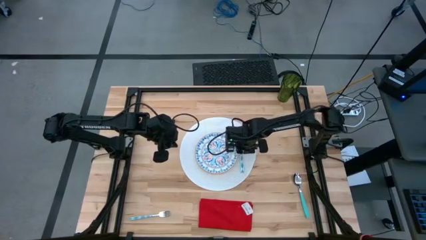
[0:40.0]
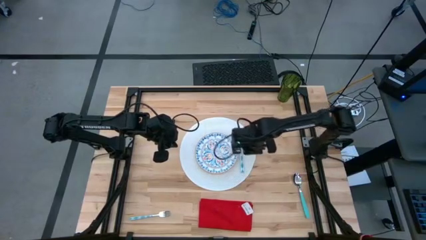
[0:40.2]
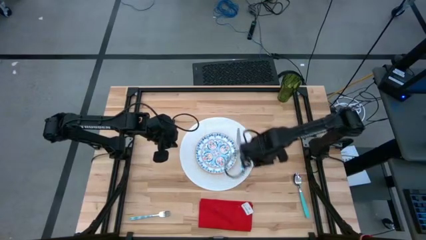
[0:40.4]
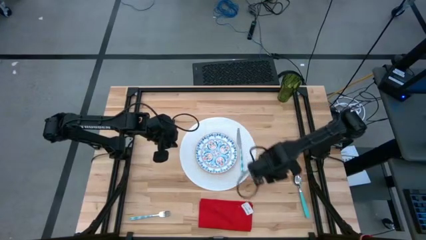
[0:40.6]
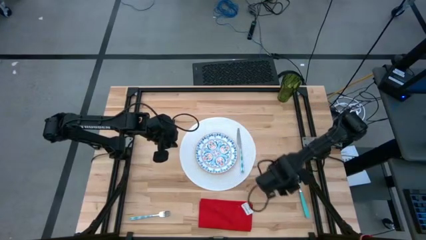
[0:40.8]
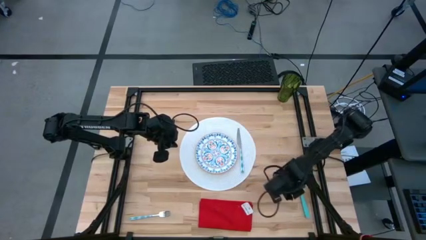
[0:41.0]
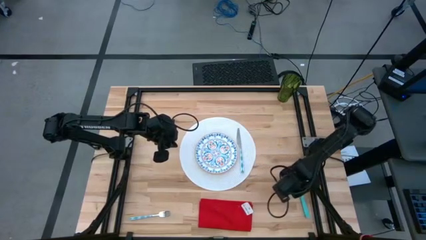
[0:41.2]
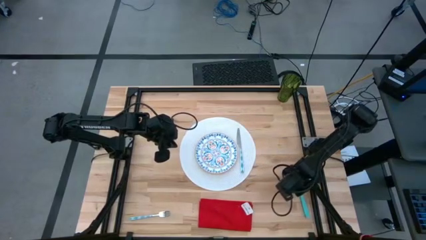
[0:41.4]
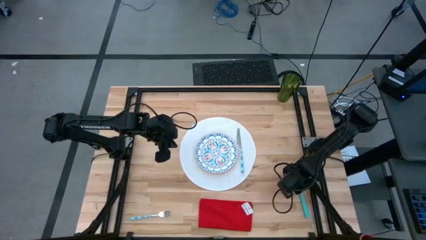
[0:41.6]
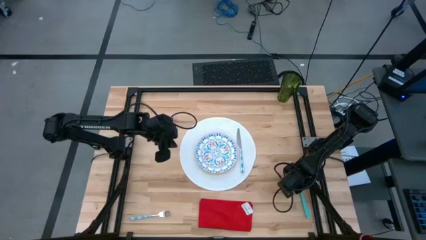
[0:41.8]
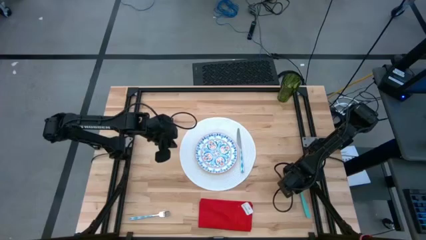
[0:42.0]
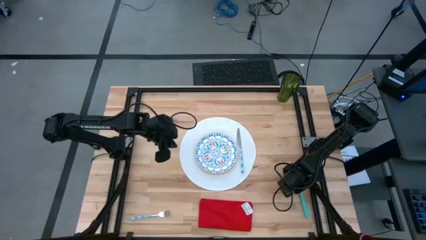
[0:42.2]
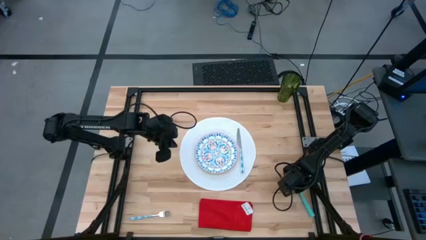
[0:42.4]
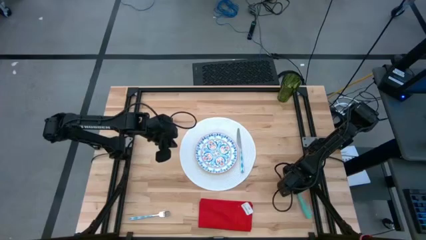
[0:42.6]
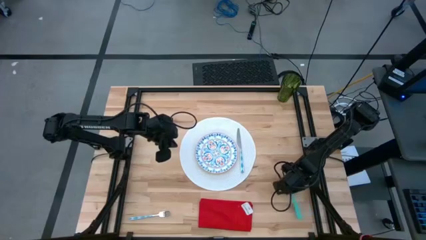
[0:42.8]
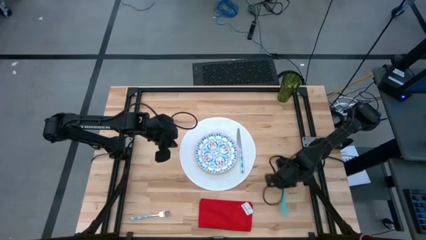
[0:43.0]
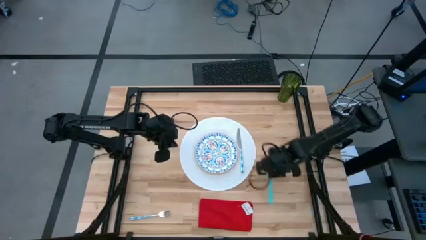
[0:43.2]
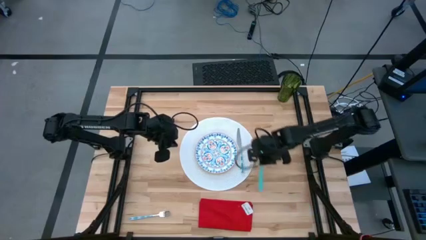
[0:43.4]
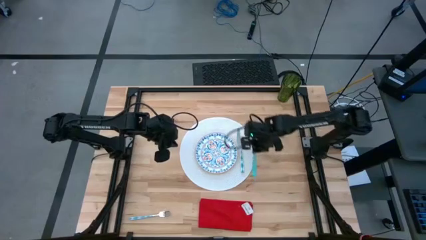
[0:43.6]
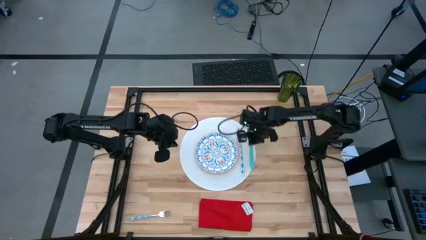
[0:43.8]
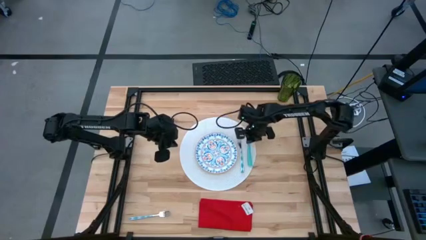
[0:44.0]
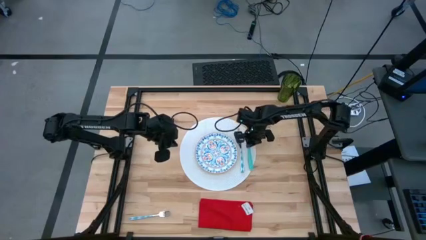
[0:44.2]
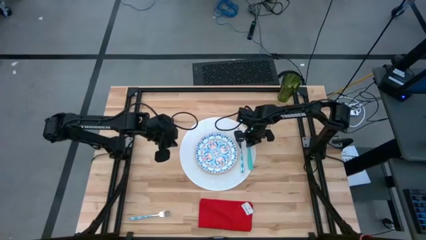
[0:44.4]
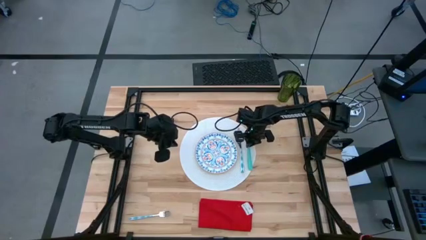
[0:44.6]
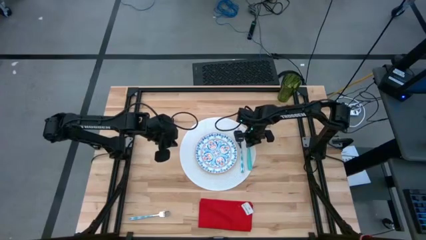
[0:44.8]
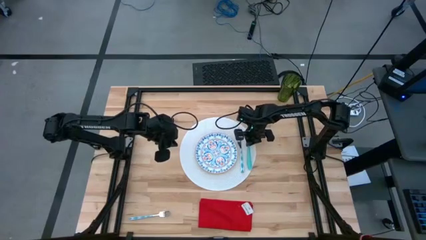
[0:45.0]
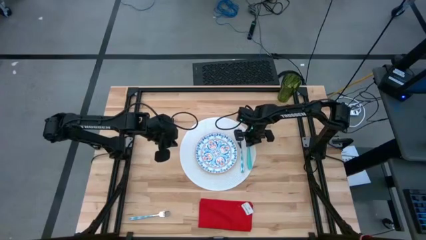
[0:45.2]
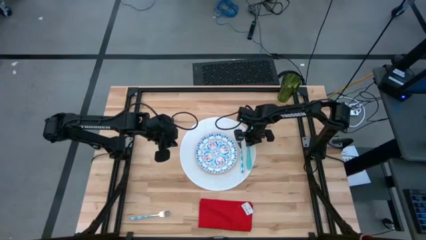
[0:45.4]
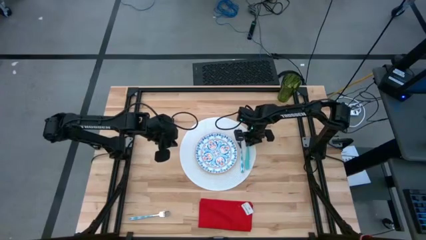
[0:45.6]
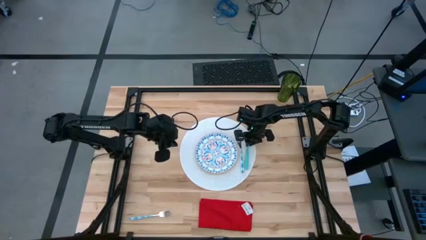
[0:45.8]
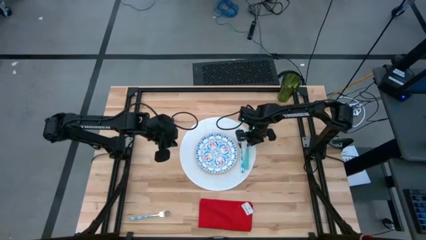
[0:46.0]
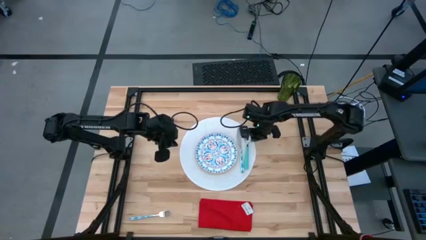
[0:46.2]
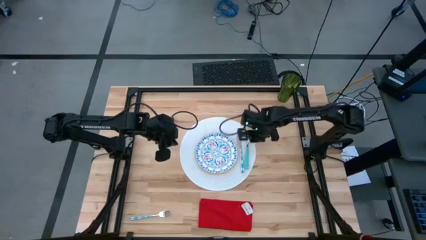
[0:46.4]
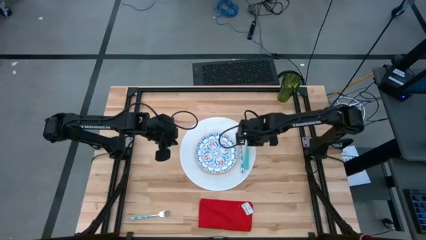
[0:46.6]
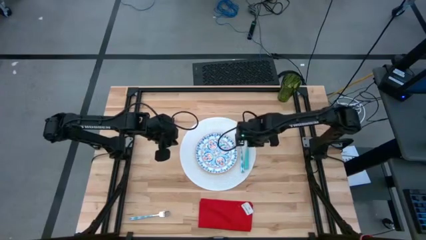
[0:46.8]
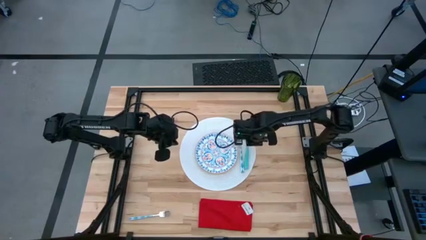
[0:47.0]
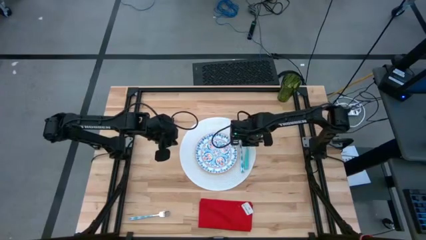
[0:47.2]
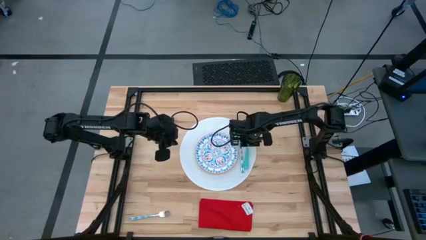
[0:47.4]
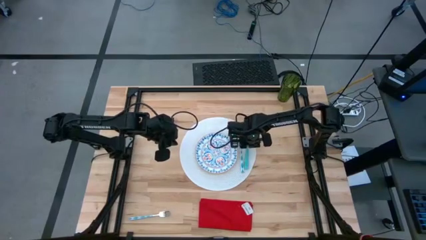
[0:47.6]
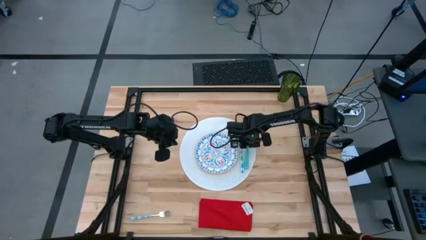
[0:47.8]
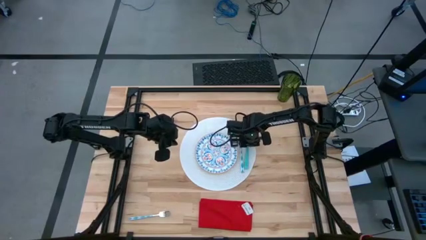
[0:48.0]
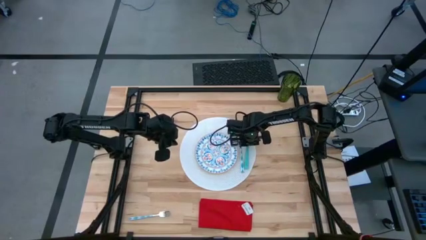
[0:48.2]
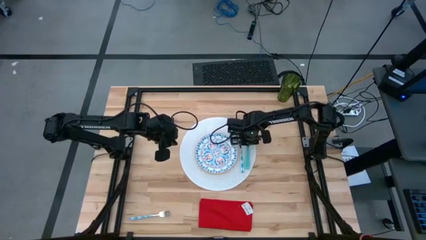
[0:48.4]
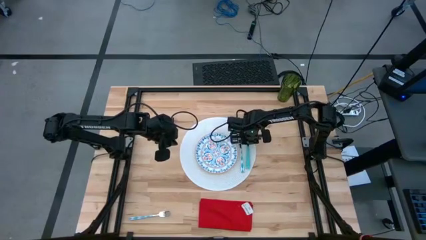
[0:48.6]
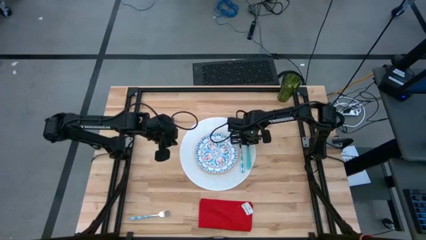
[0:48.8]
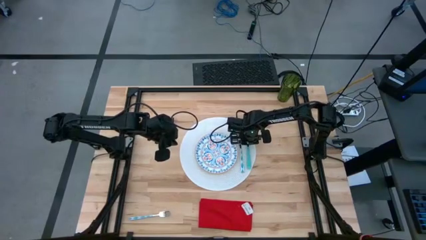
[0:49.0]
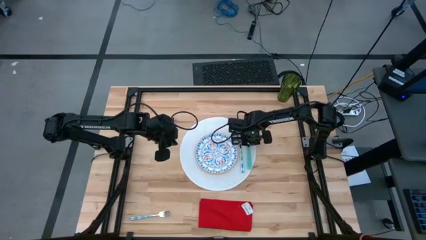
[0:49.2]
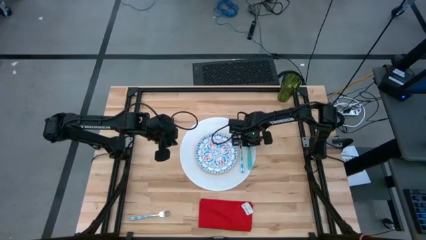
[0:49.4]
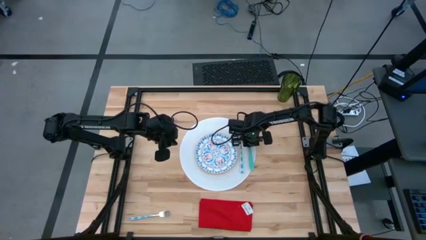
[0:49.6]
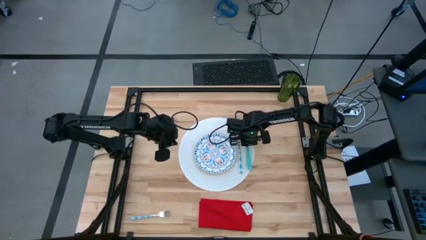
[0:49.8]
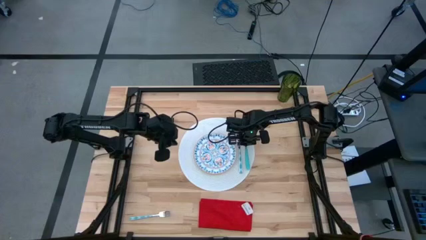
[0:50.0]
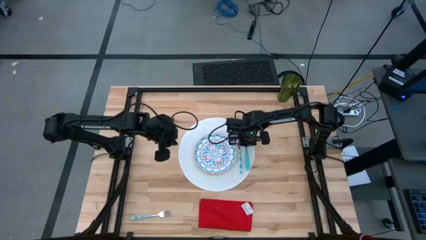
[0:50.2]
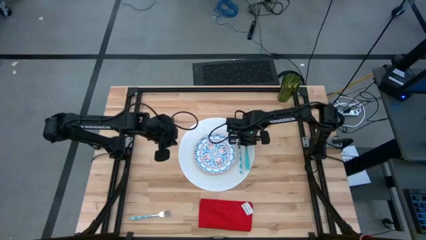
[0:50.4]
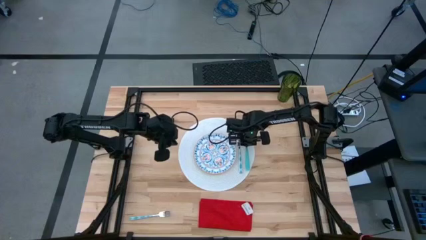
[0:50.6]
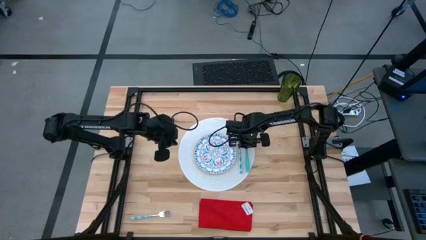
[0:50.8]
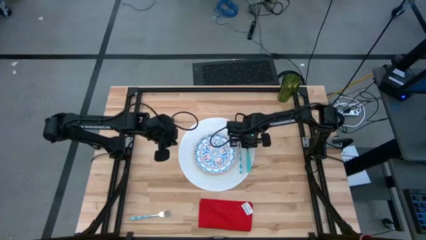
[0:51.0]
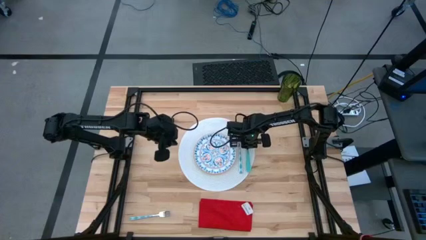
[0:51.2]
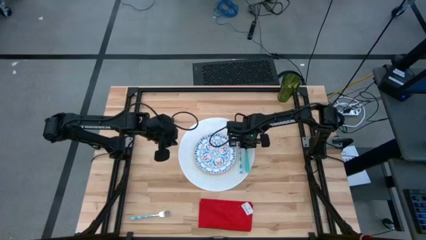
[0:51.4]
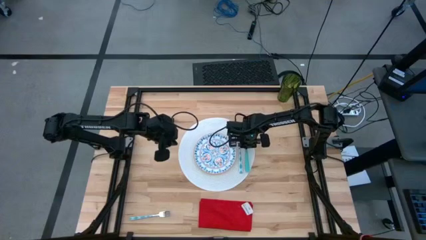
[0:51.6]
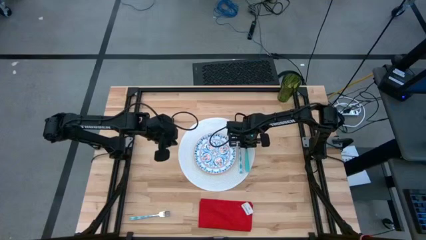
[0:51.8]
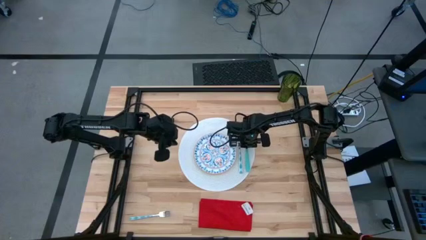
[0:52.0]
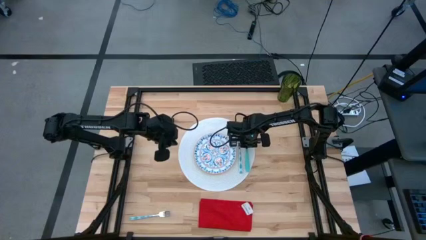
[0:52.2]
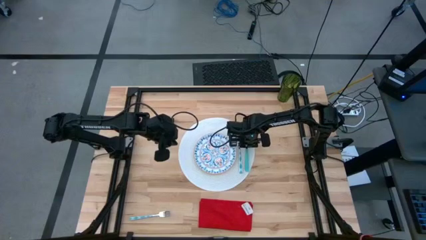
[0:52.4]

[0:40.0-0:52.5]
Task: Set table place
Put the green spoon on the white placemat to the right of the table knife

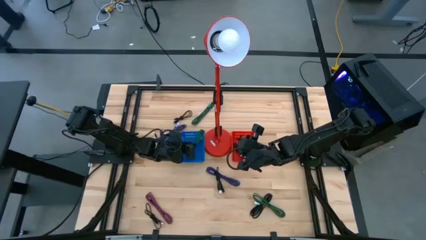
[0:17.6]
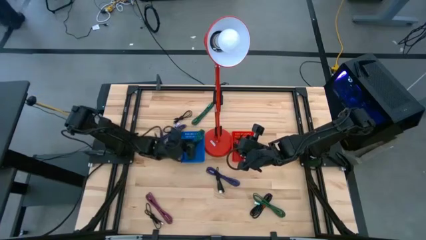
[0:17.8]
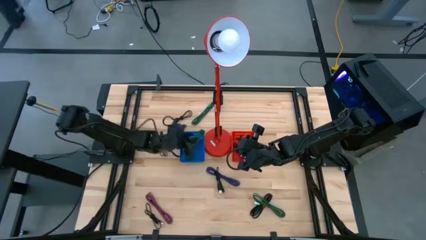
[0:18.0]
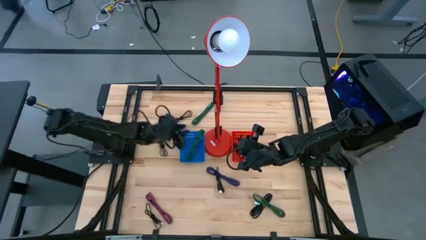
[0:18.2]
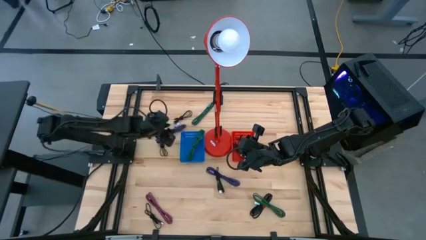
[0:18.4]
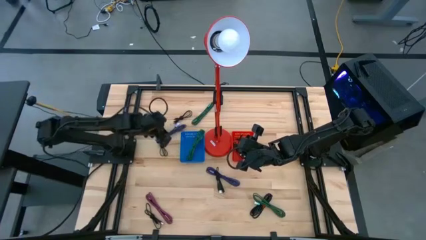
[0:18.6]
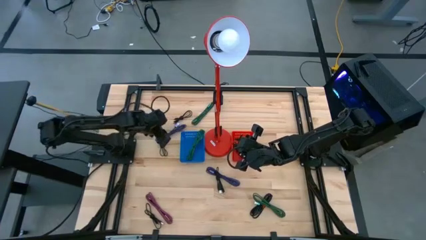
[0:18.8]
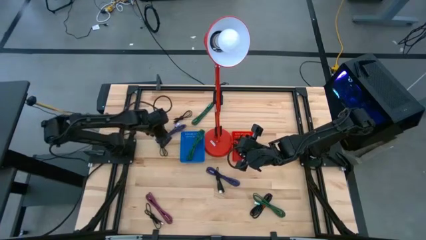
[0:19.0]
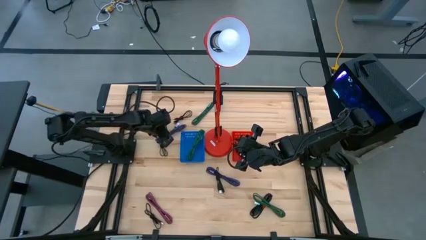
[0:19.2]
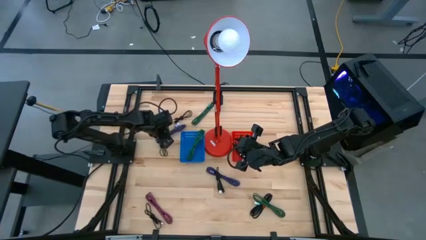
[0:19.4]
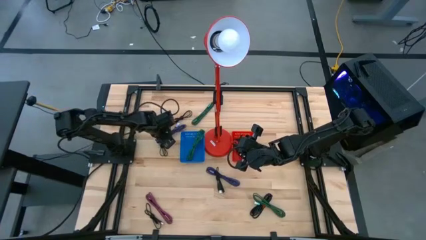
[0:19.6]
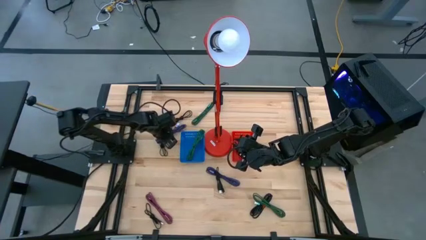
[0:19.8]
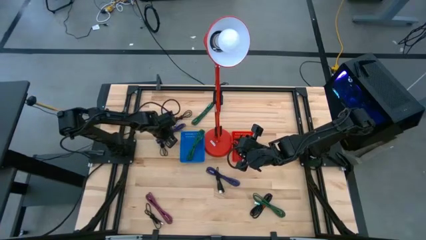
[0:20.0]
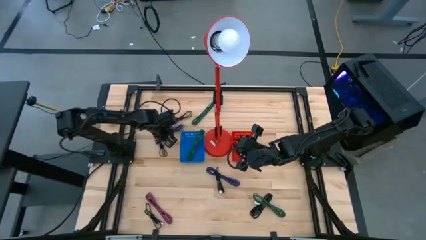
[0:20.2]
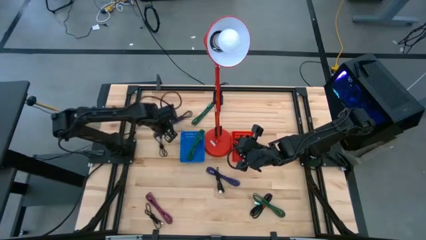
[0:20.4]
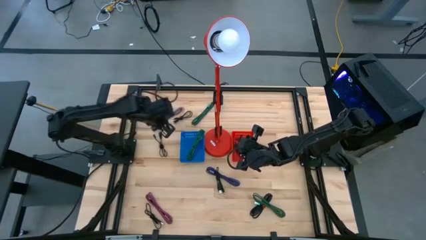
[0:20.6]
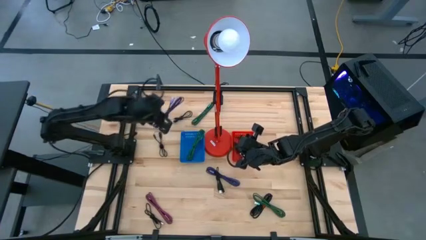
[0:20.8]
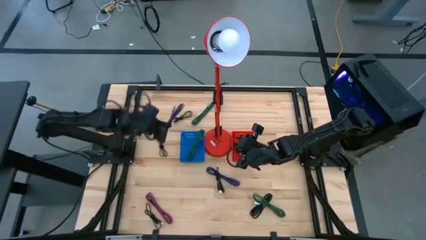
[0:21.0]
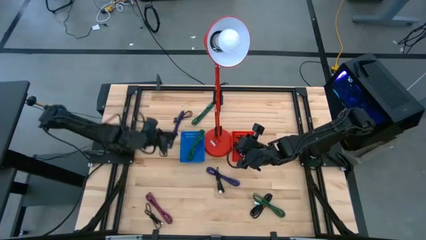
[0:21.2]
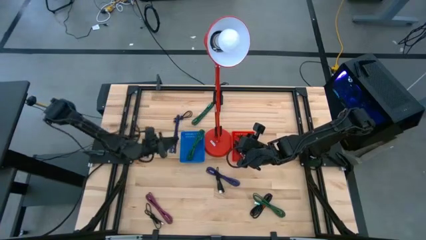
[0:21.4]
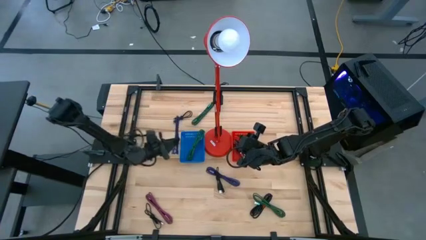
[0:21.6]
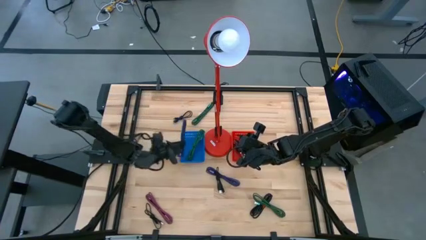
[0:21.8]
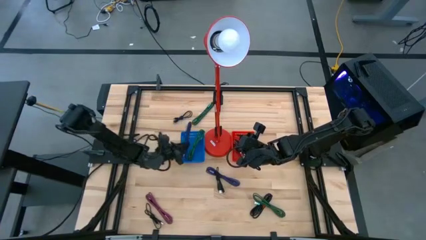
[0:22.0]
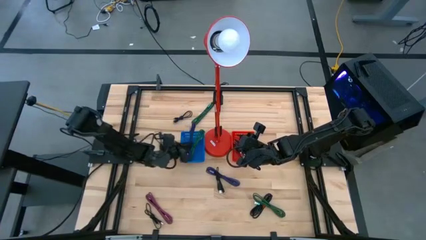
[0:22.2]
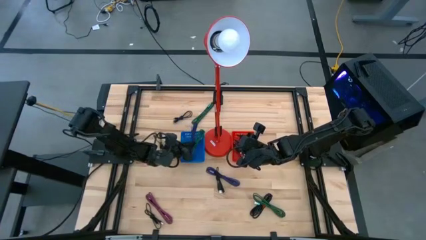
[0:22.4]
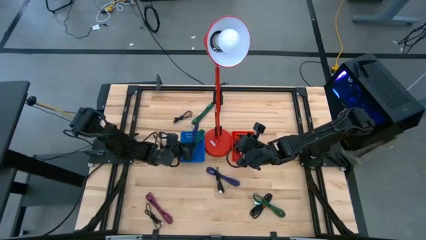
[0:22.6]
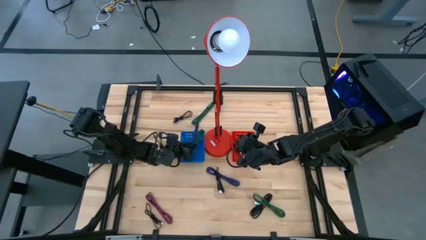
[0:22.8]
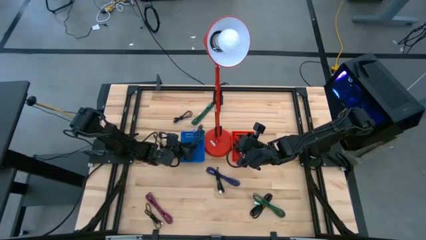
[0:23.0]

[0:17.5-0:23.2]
Task: Pick & Place USB Port
Put the blue charger cable into the blue bin
